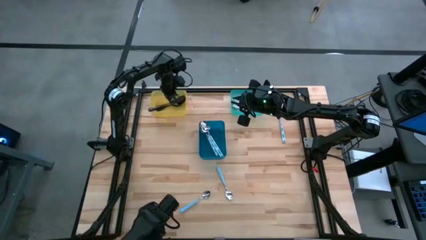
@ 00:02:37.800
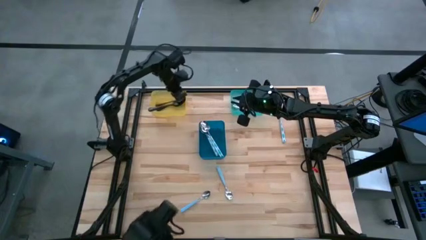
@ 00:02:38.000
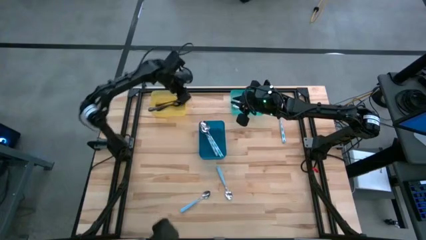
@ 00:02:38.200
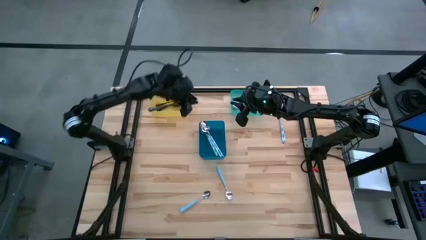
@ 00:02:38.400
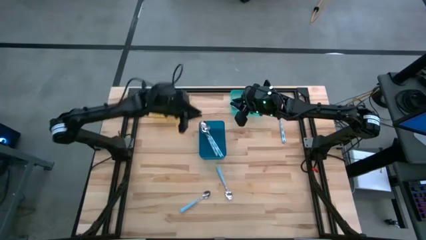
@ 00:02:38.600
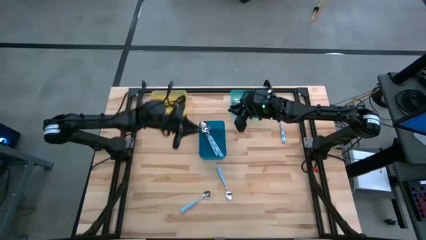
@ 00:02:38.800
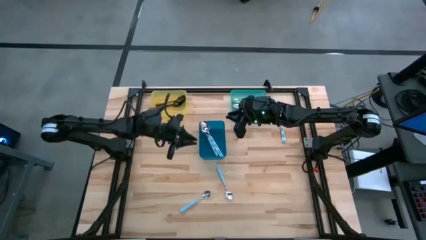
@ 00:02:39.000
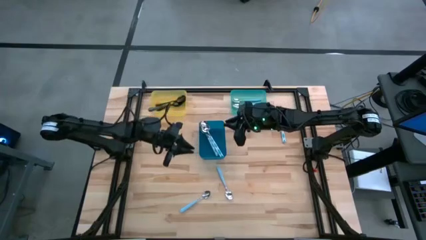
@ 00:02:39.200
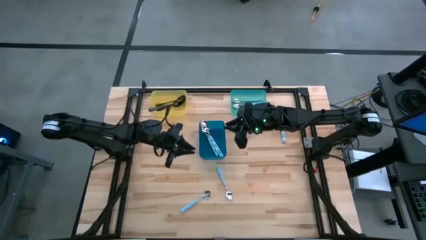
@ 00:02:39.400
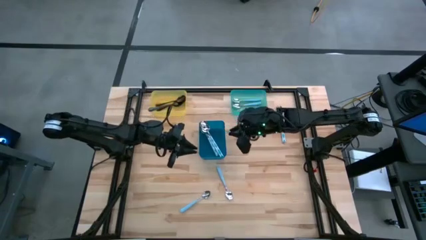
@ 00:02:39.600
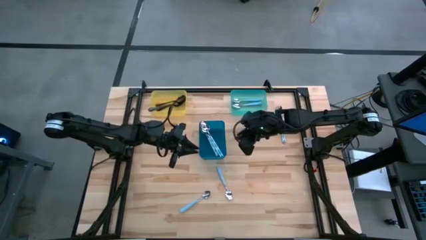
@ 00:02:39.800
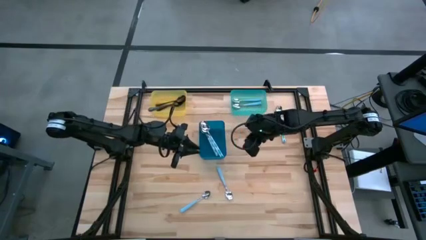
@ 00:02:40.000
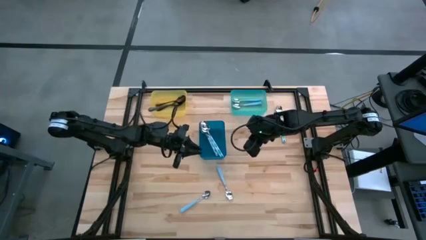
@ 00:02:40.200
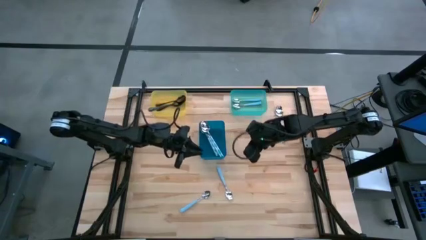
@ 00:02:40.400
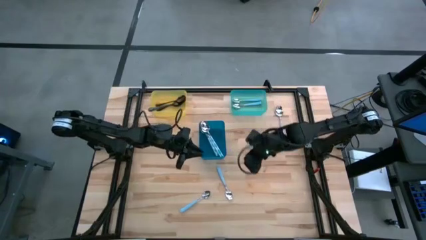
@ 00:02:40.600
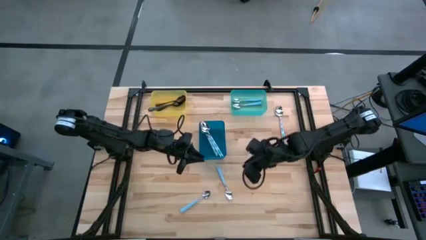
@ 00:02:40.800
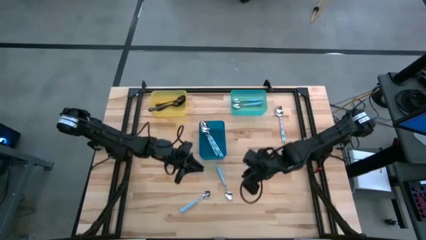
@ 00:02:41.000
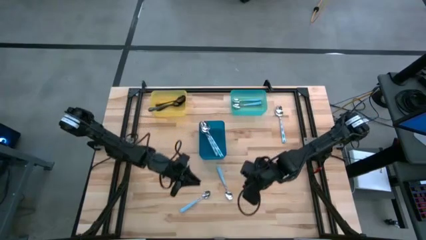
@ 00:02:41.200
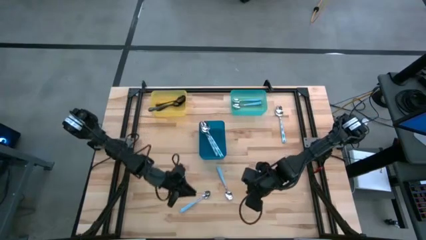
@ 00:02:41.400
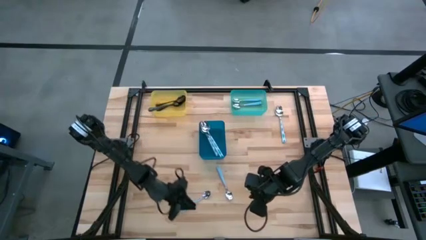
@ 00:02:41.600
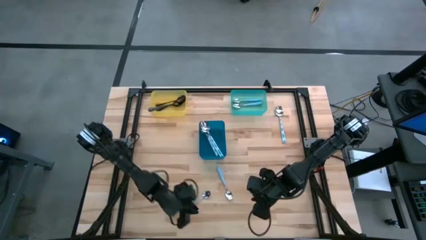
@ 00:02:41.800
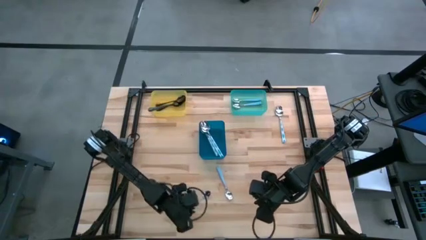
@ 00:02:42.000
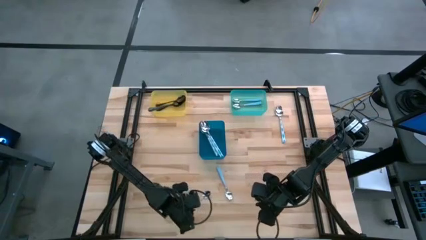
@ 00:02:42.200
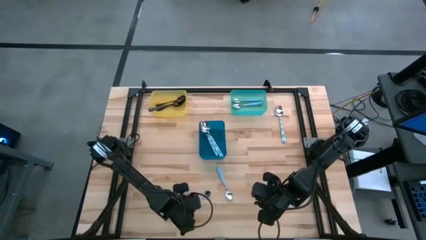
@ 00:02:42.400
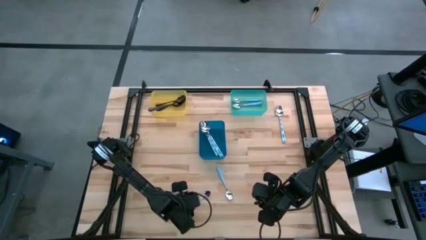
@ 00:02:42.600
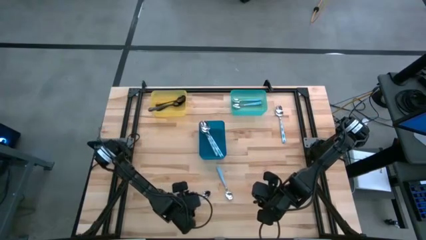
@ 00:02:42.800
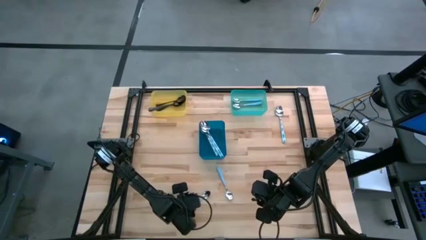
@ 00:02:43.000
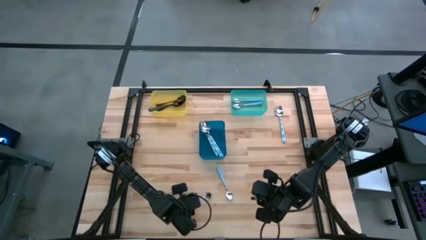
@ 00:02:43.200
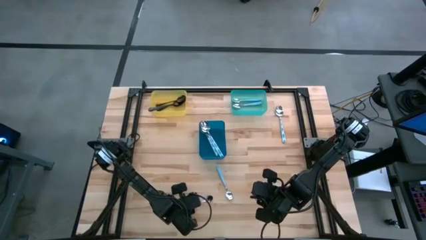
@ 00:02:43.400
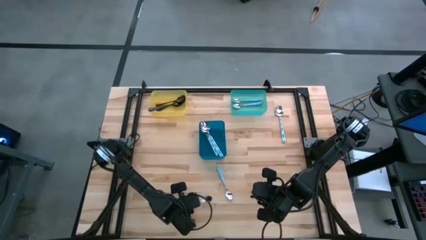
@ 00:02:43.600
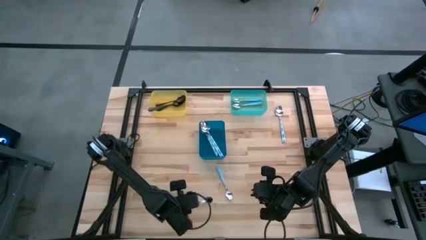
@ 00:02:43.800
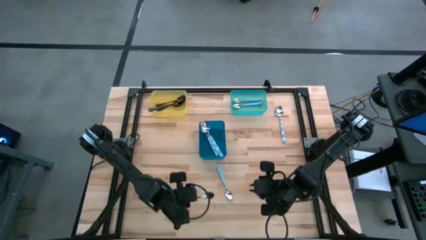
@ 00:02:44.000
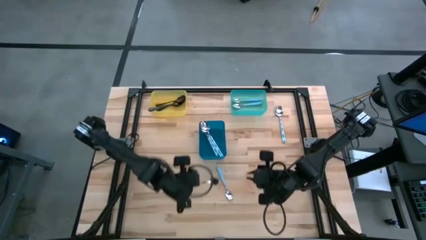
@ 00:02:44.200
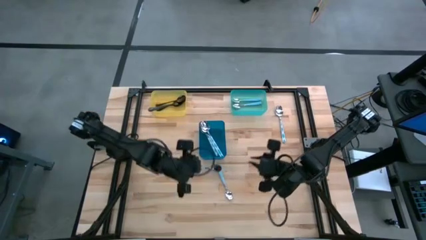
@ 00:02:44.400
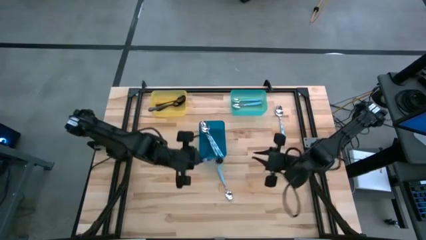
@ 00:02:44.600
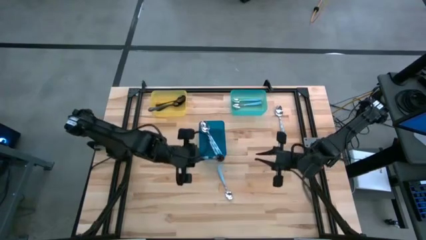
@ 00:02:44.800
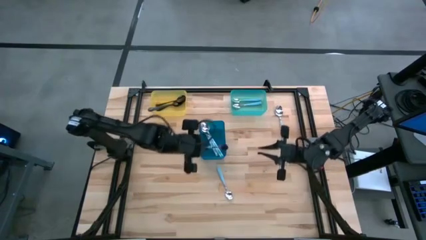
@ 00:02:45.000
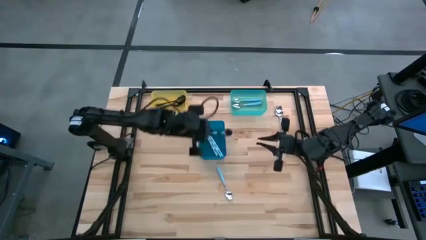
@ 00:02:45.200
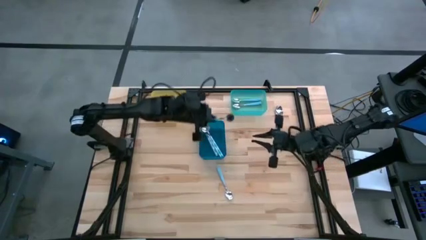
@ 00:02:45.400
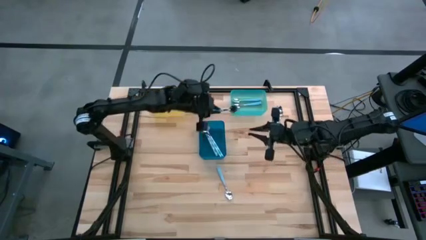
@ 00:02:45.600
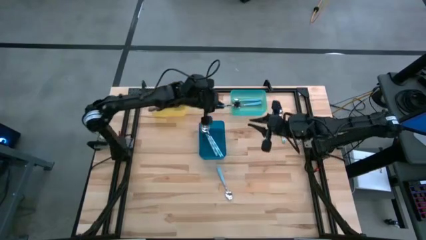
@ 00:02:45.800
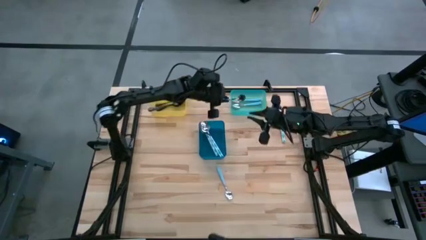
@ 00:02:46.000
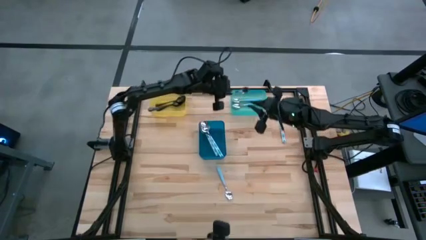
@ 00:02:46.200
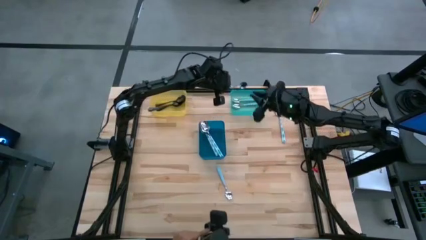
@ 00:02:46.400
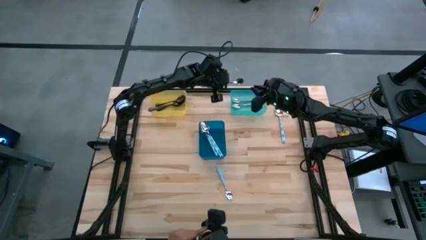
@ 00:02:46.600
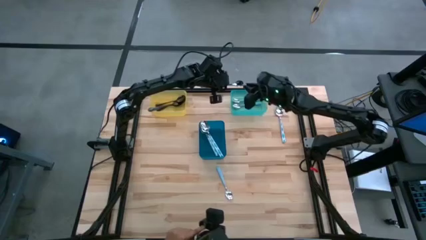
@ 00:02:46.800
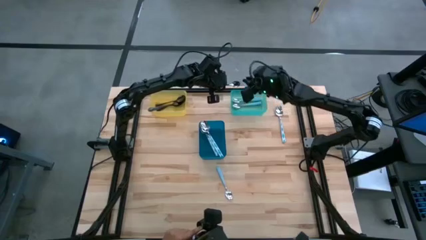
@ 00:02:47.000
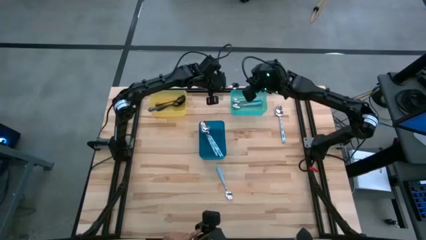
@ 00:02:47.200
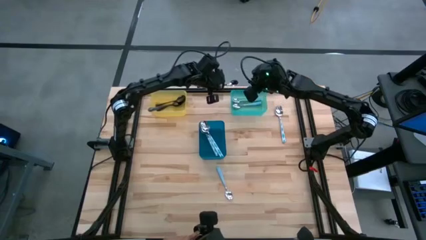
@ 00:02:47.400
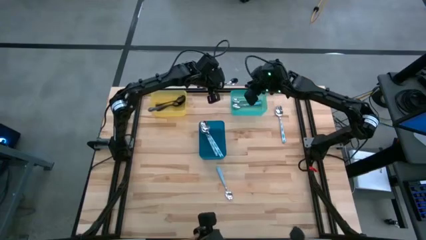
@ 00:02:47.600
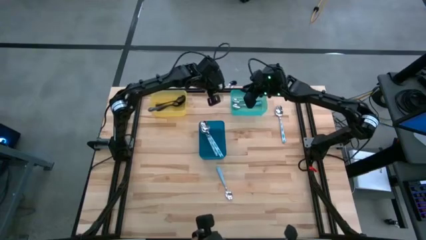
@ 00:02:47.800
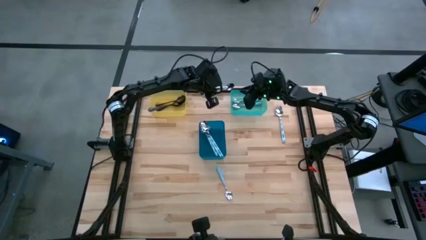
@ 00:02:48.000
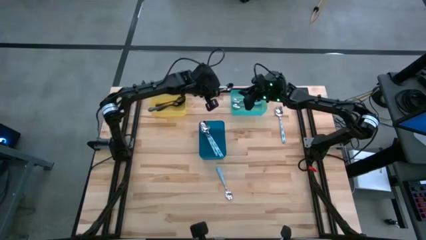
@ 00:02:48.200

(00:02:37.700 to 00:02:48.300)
Task: Sort silverware by color (type)
Put the light blue spoon into the light blue bin

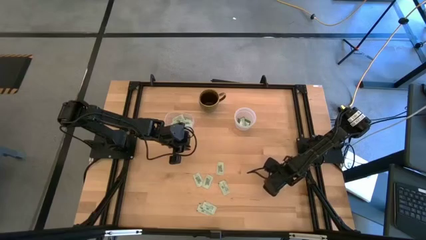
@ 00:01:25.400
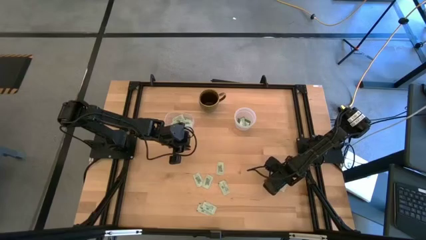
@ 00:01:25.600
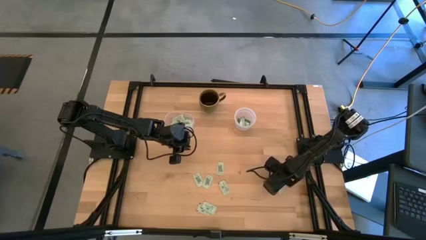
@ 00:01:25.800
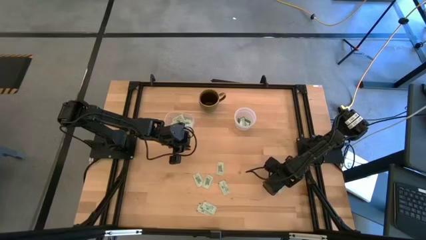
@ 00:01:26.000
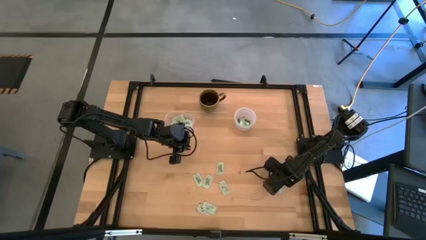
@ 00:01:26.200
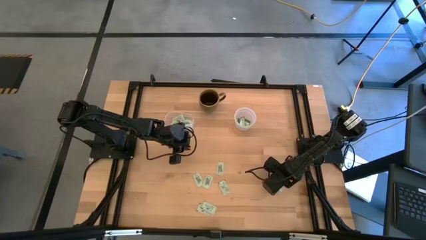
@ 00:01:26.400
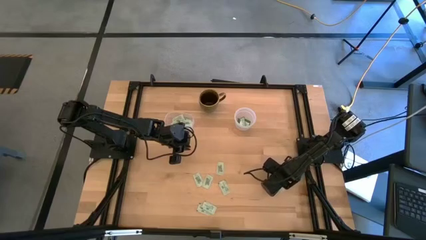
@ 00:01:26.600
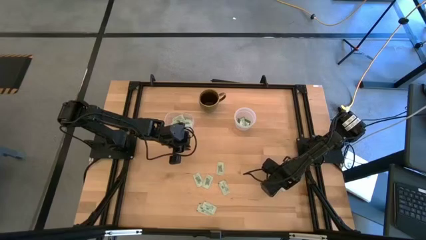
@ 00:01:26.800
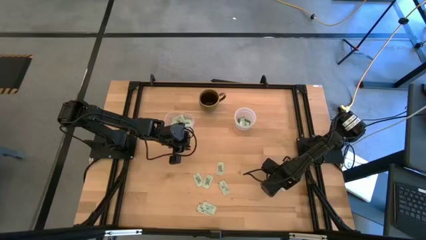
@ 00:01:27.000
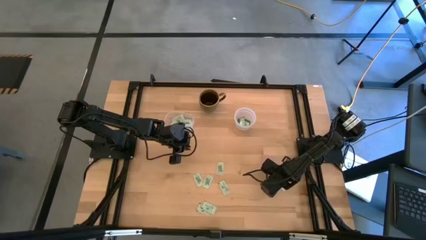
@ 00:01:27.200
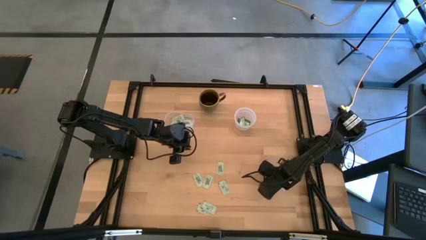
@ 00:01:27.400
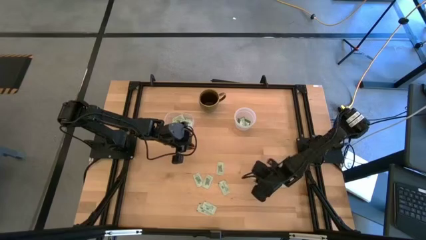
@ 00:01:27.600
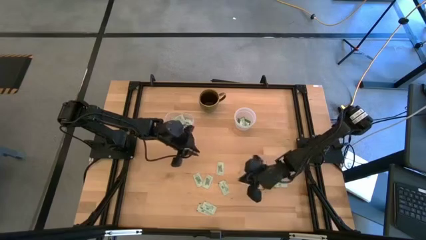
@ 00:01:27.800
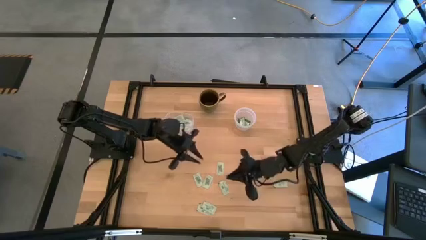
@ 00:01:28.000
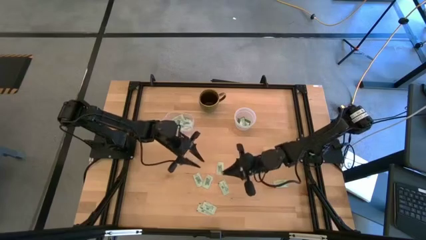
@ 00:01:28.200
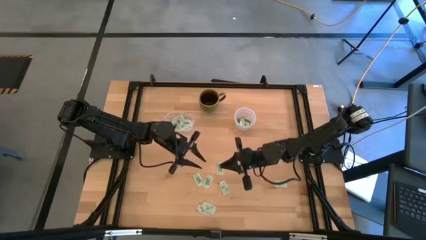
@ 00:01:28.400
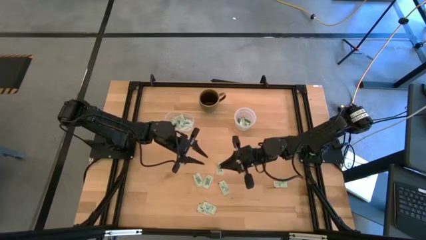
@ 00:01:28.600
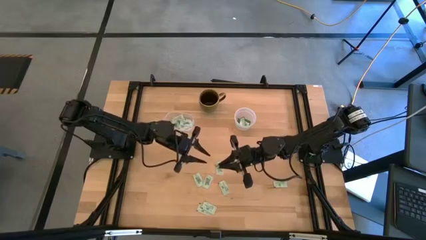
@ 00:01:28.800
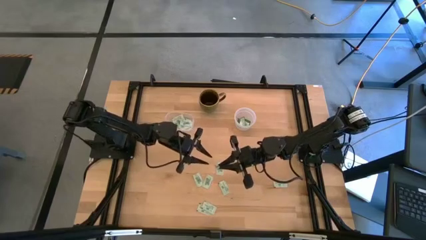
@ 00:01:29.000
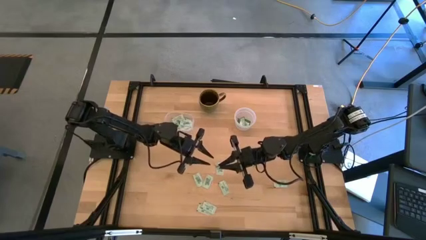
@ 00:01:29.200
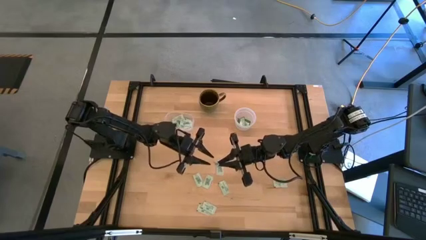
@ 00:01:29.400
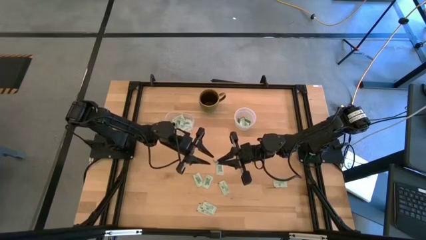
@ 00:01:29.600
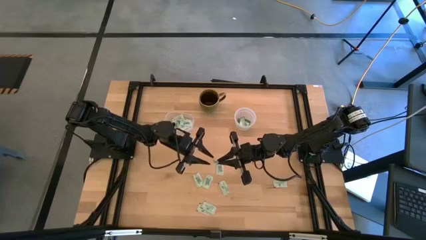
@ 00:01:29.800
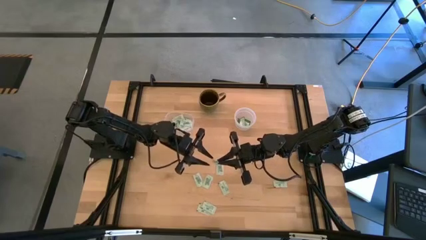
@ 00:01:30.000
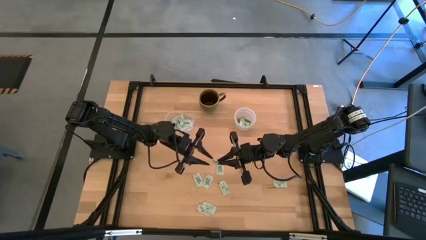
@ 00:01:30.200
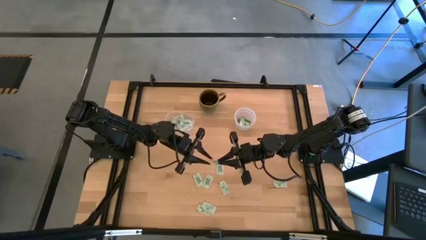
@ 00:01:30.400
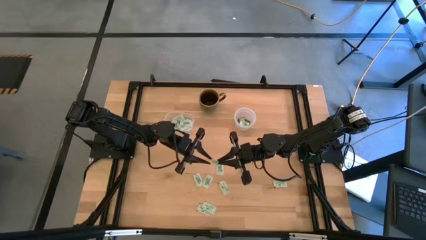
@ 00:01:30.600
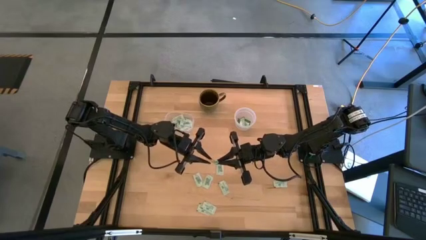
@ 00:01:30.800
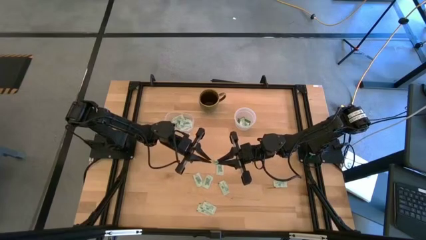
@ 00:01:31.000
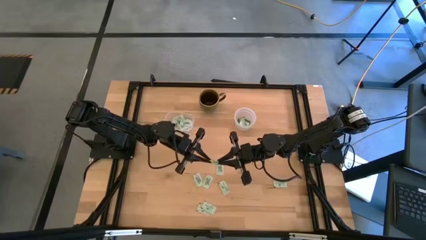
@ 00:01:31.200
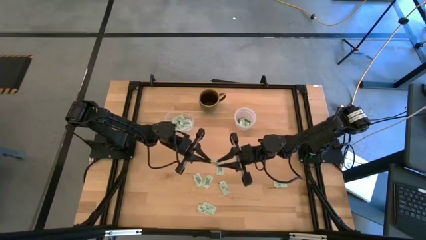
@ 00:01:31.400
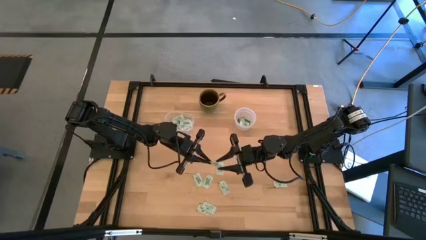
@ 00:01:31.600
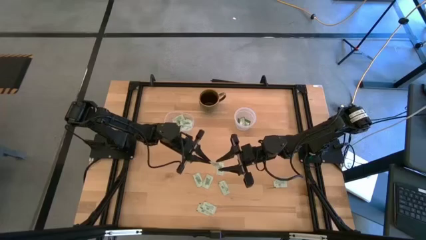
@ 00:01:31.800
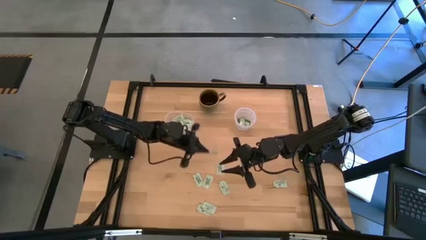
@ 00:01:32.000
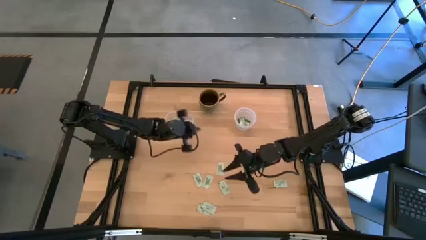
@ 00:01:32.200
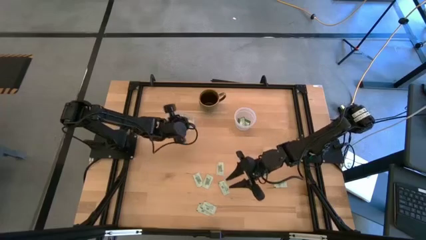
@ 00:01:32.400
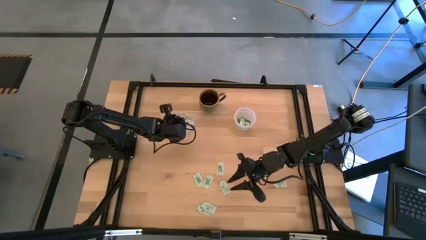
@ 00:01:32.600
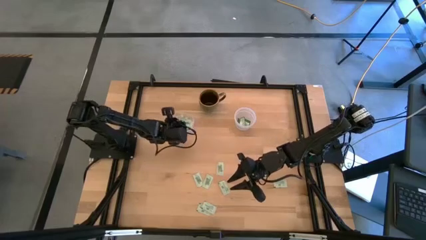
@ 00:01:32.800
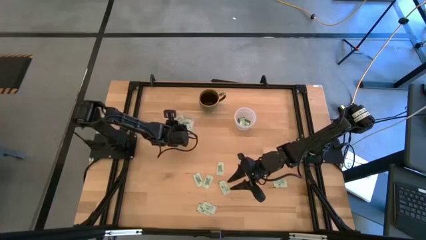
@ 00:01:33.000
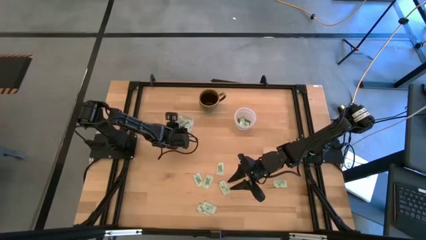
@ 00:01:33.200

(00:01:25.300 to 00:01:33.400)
Task: Pick and place Stevia / Truvia into bins
Put the light green stevia packet into the left transparent container
